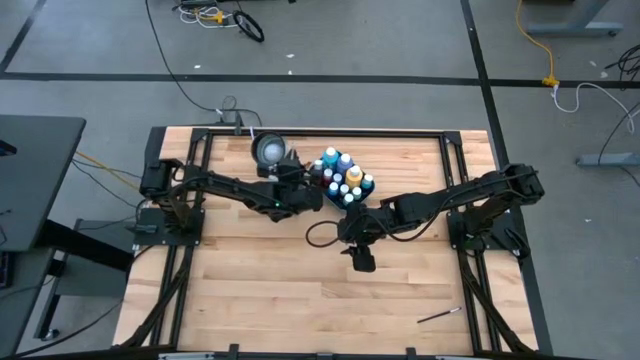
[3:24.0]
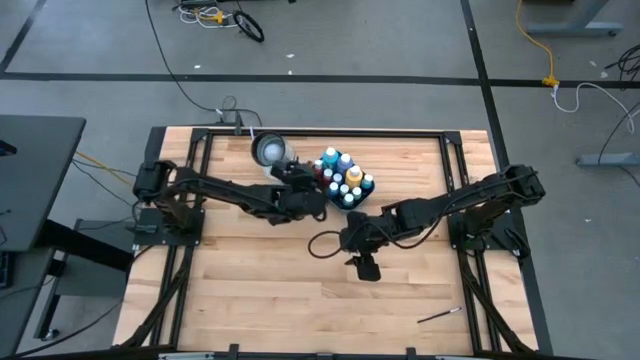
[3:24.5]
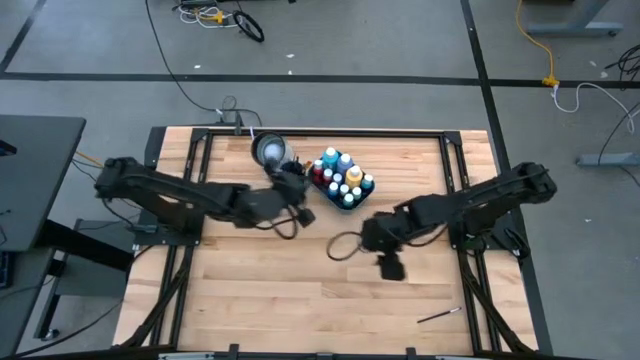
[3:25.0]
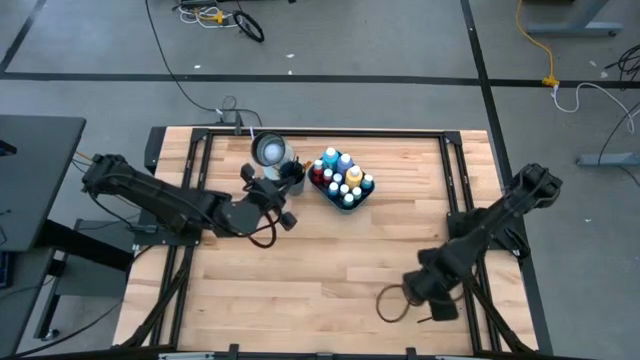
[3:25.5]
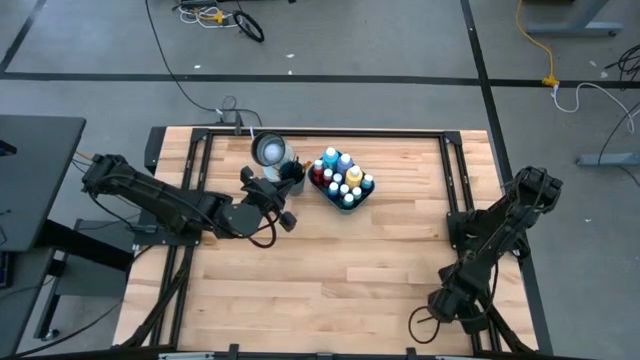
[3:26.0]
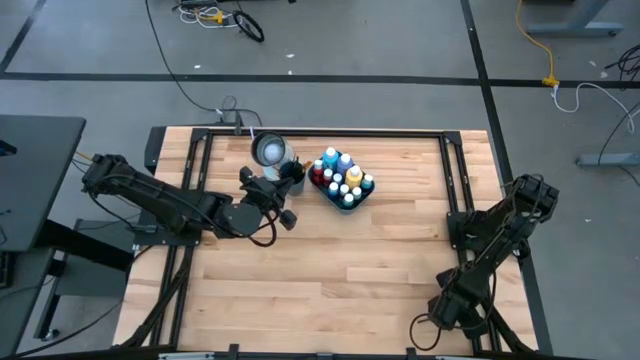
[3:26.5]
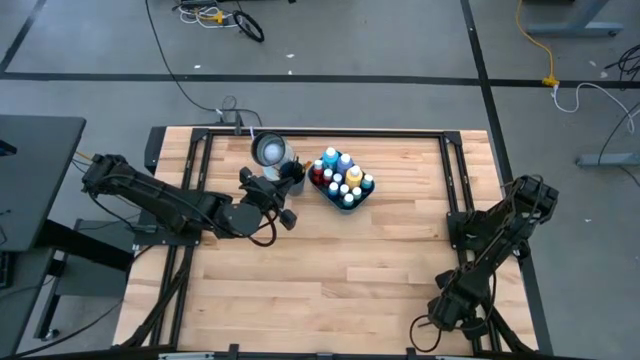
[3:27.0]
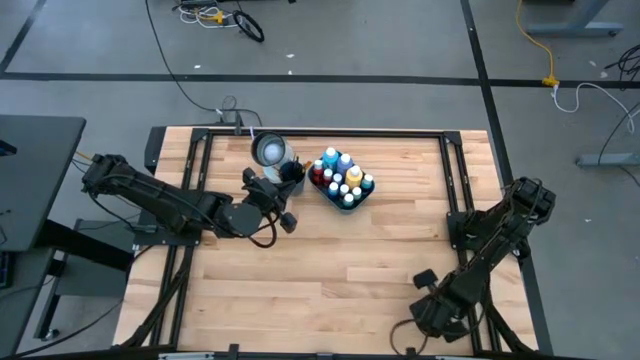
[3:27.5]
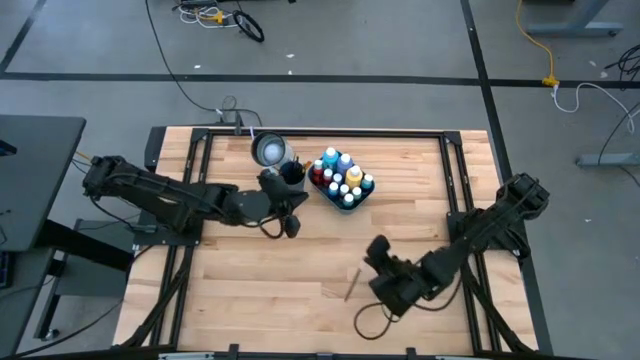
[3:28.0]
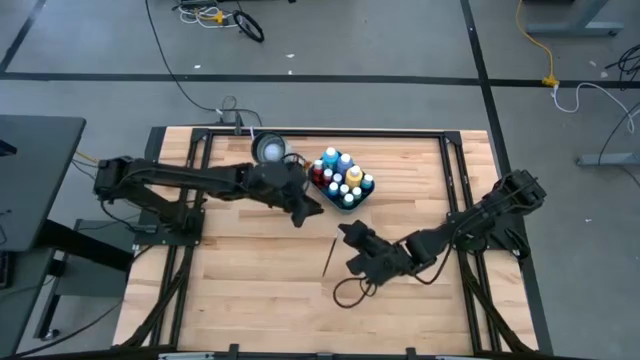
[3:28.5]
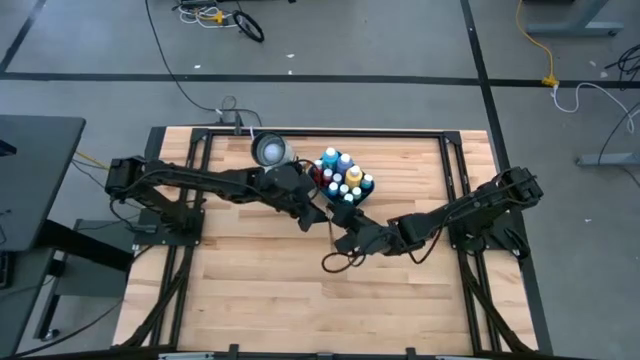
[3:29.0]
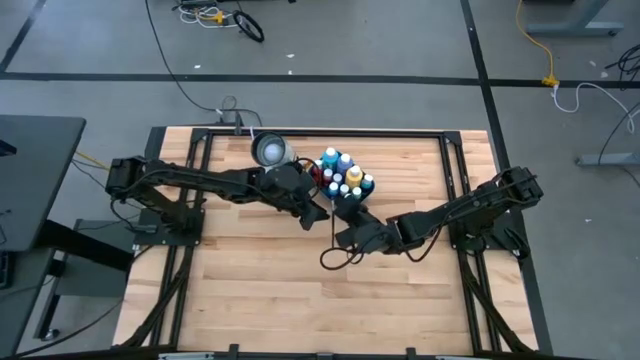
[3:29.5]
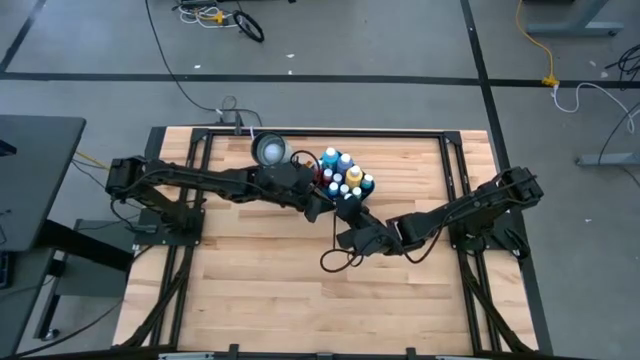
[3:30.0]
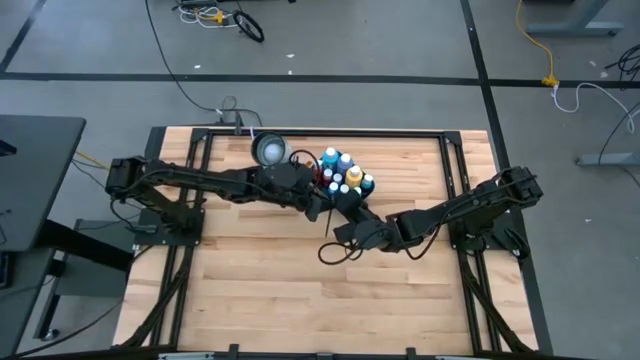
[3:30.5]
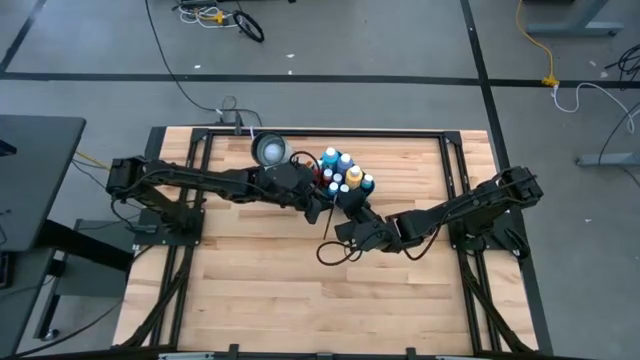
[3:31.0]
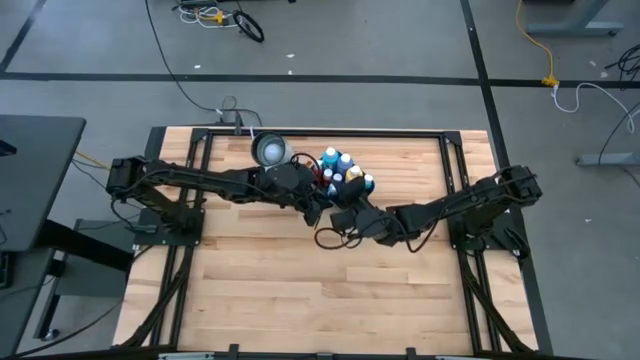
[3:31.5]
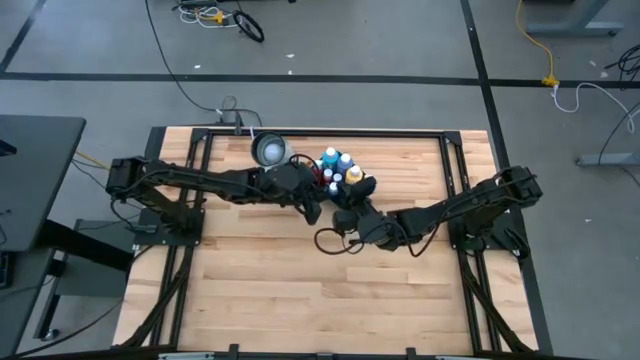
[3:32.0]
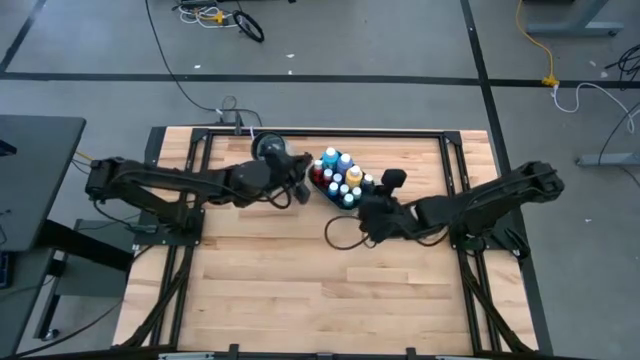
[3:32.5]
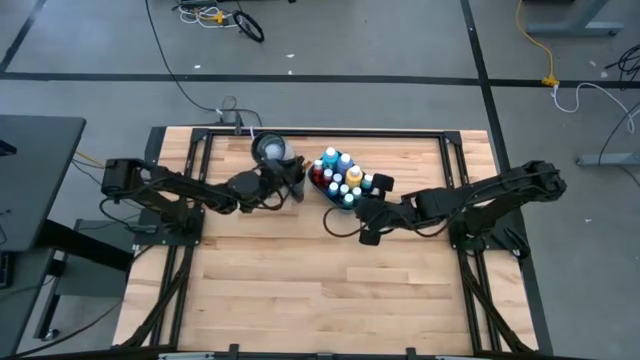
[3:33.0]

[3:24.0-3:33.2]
Task: Pick & Place Paint Supplies
Put the silver paint brush into the blue cup

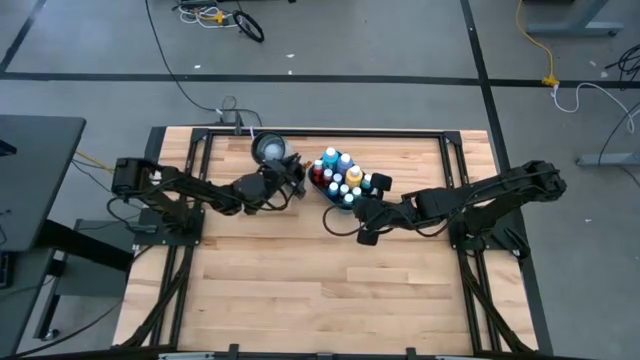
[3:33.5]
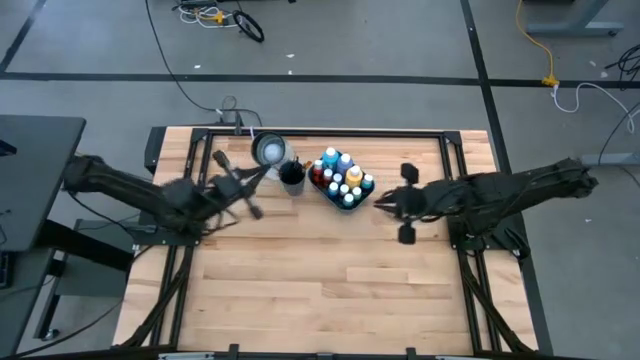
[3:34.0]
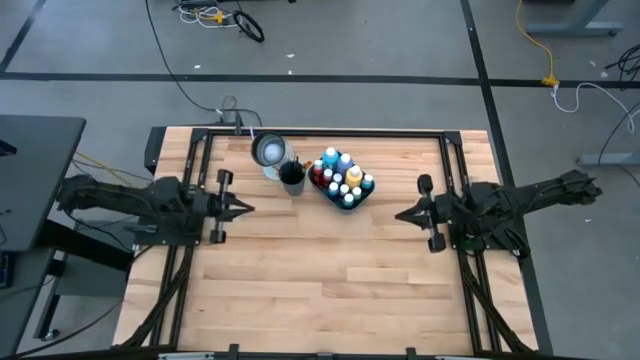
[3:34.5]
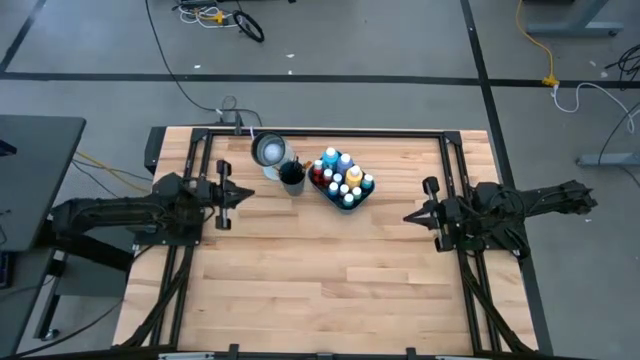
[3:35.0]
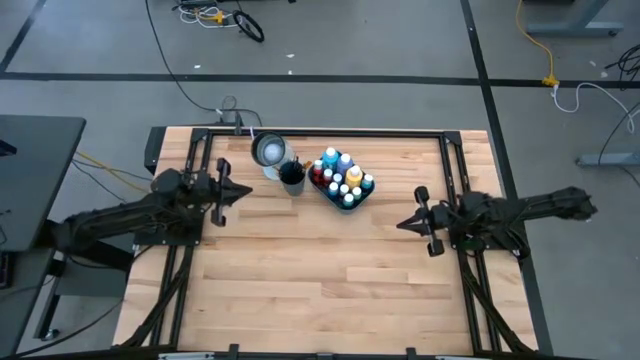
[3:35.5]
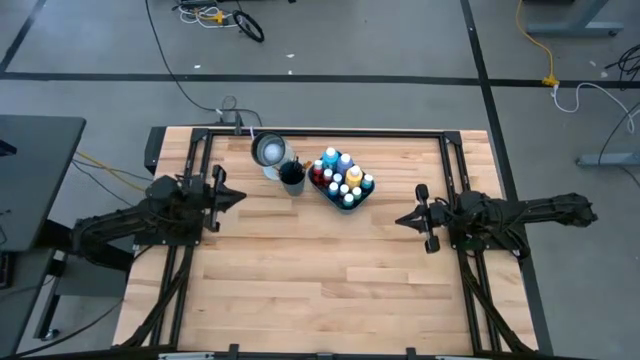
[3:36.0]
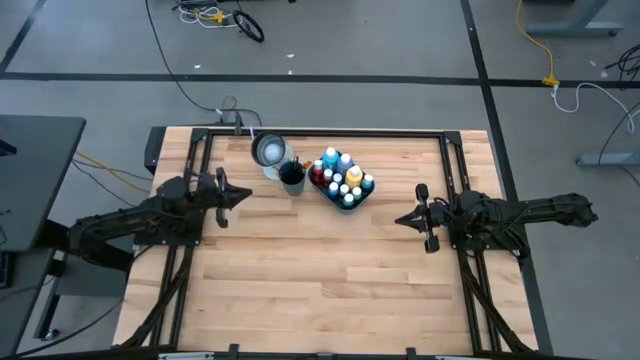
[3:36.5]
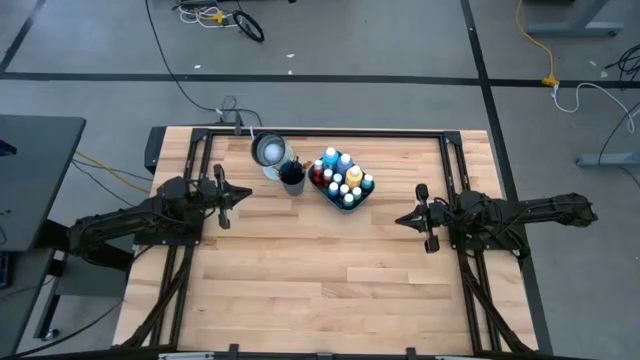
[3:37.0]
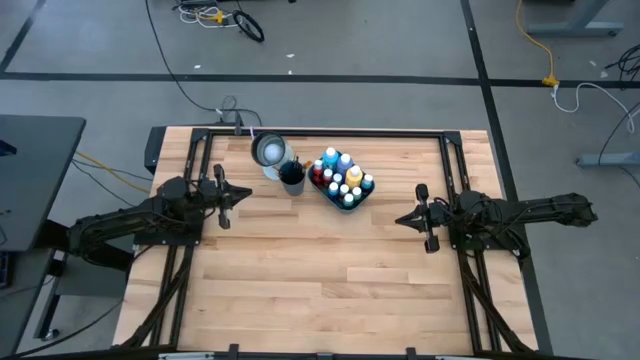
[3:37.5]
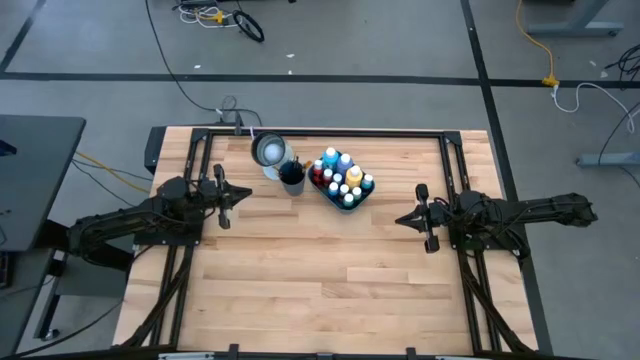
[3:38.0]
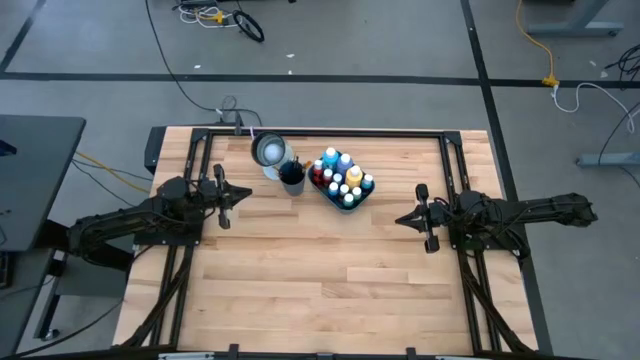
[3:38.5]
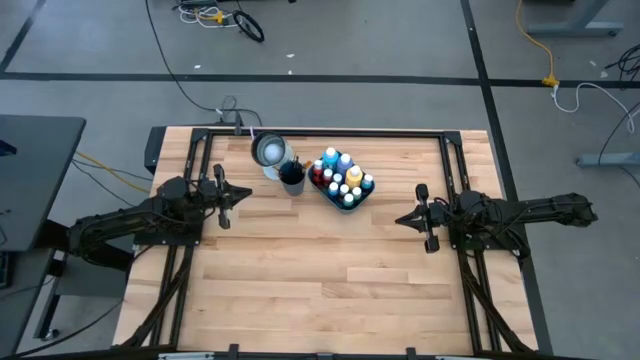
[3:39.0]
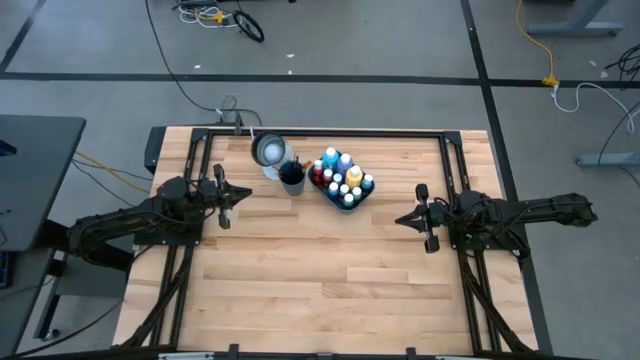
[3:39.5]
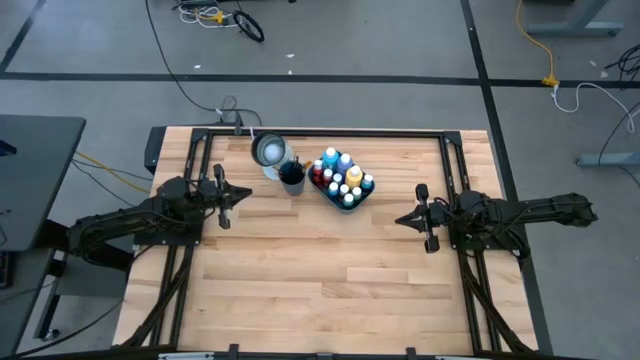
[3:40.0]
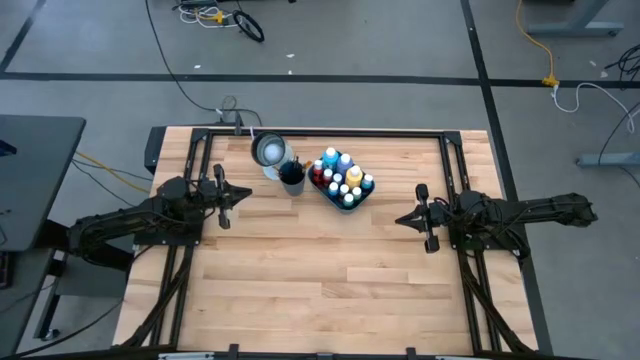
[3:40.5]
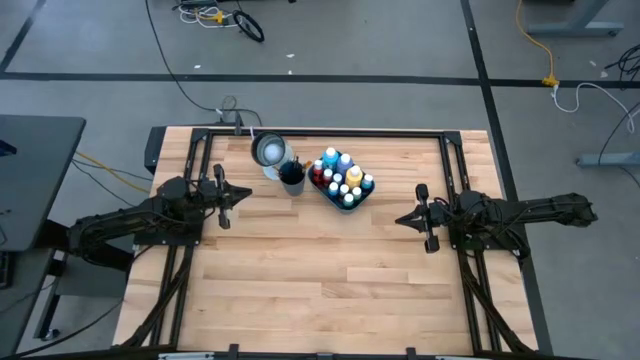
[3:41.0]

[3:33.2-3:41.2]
Return to Home Position
